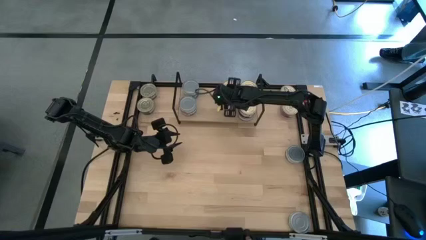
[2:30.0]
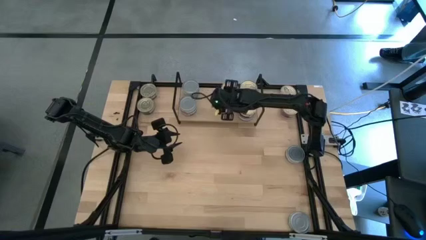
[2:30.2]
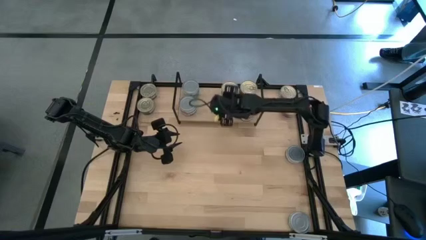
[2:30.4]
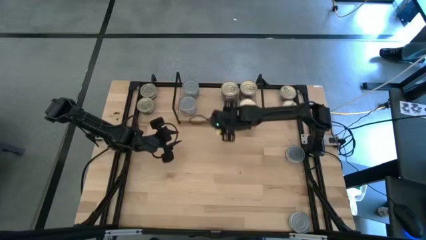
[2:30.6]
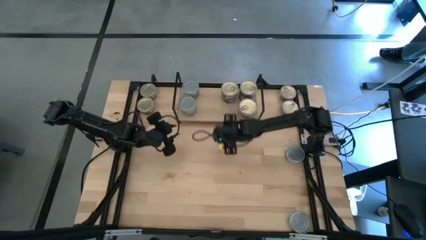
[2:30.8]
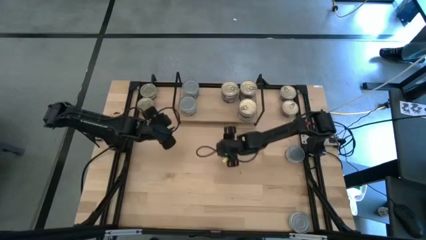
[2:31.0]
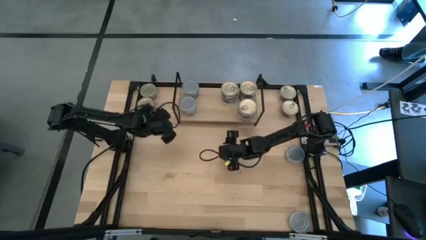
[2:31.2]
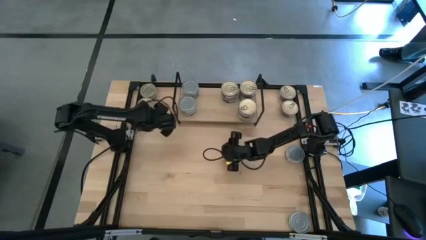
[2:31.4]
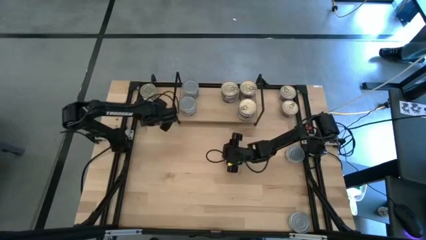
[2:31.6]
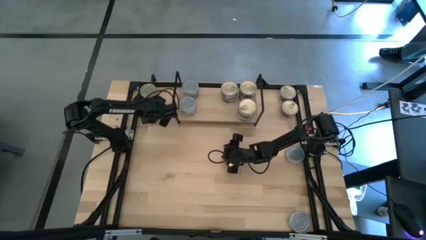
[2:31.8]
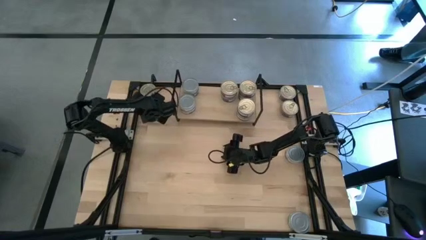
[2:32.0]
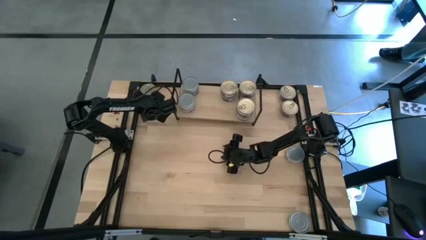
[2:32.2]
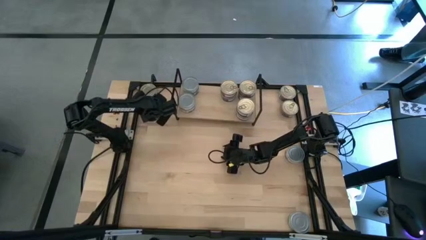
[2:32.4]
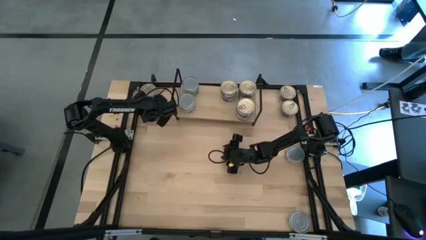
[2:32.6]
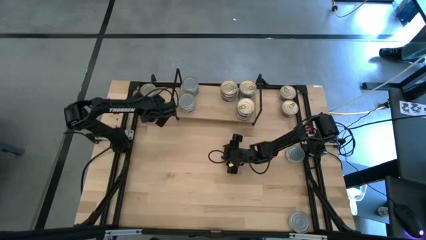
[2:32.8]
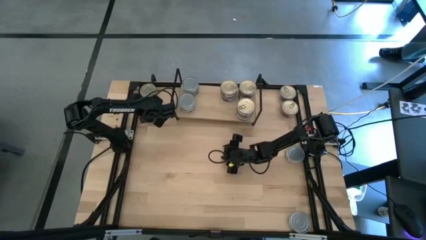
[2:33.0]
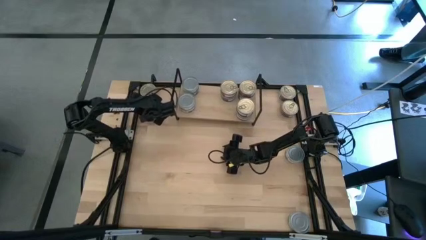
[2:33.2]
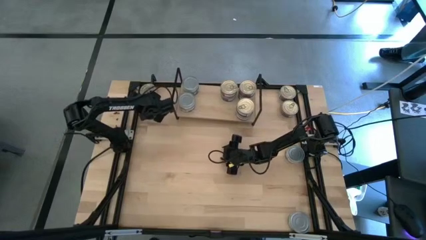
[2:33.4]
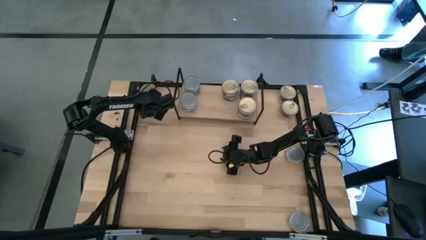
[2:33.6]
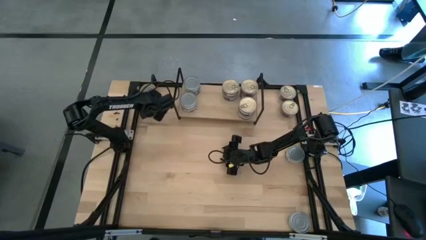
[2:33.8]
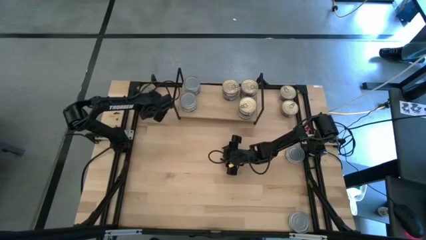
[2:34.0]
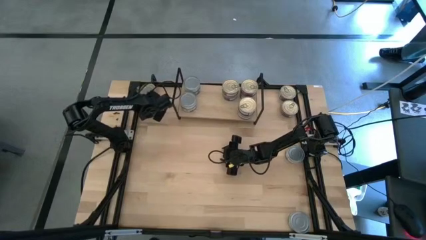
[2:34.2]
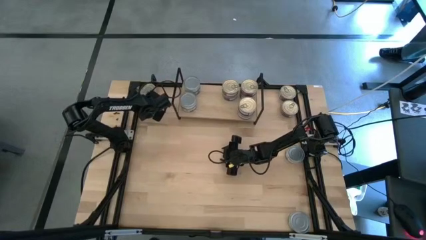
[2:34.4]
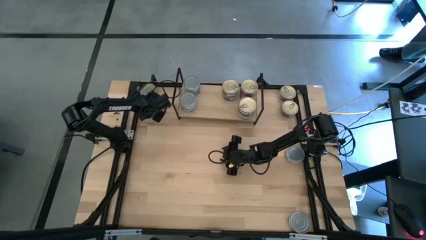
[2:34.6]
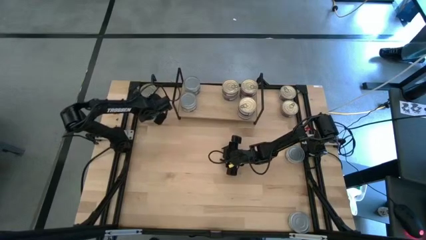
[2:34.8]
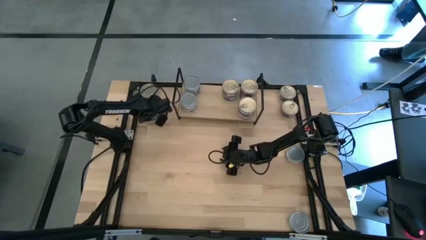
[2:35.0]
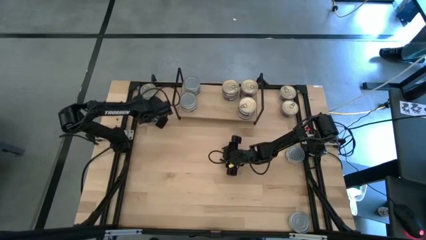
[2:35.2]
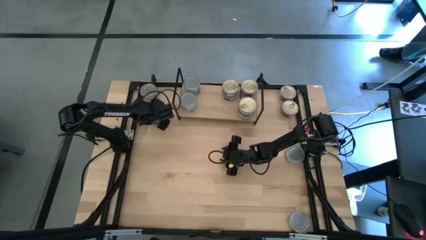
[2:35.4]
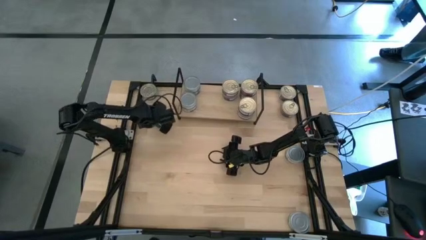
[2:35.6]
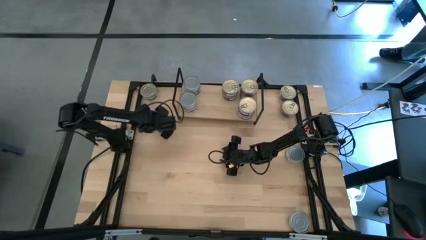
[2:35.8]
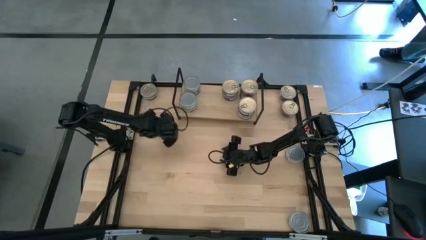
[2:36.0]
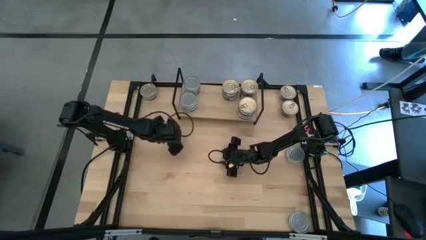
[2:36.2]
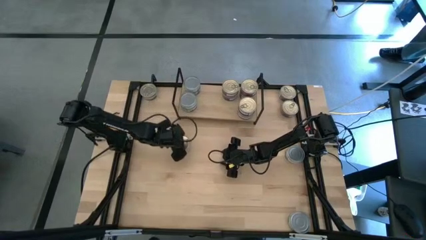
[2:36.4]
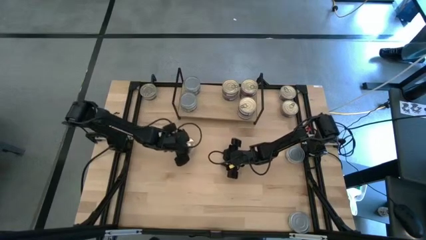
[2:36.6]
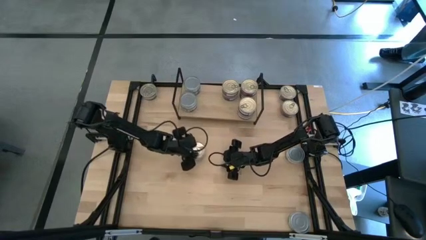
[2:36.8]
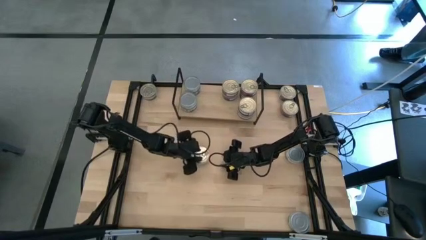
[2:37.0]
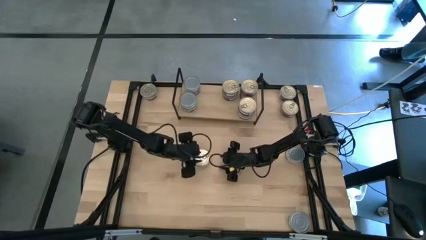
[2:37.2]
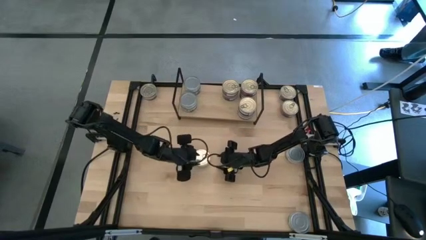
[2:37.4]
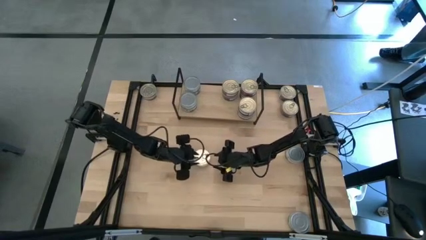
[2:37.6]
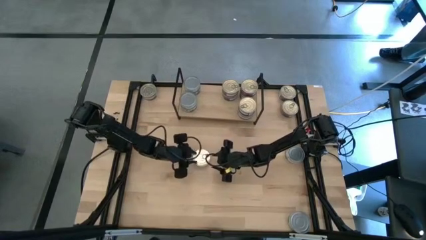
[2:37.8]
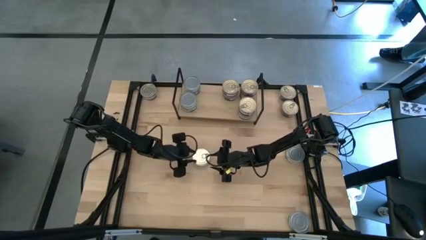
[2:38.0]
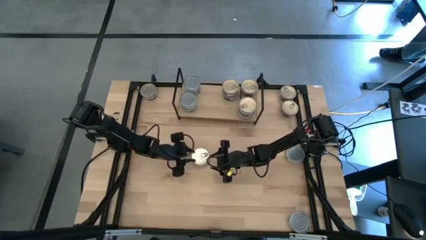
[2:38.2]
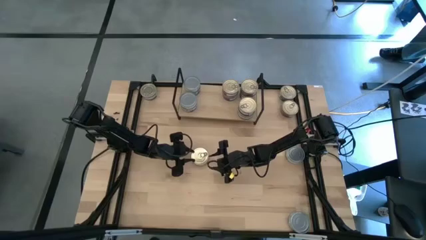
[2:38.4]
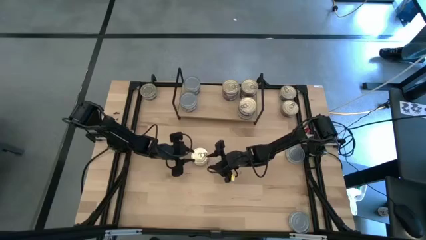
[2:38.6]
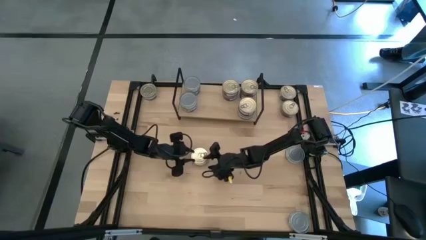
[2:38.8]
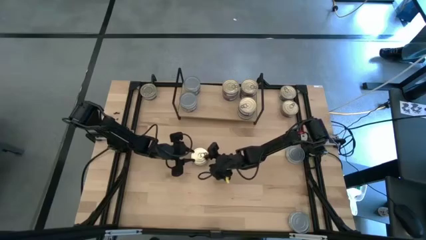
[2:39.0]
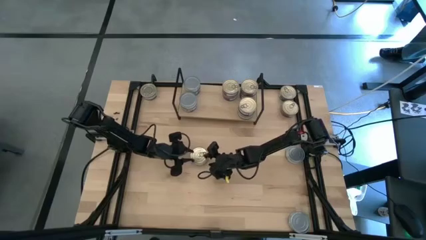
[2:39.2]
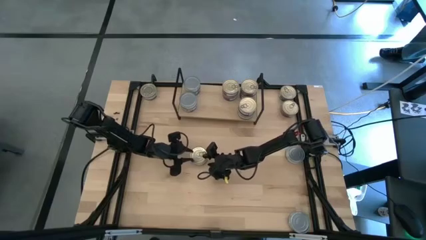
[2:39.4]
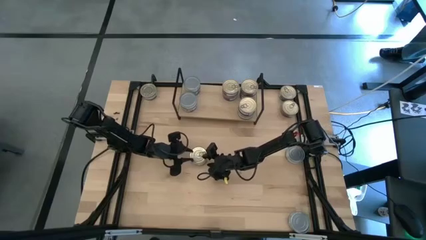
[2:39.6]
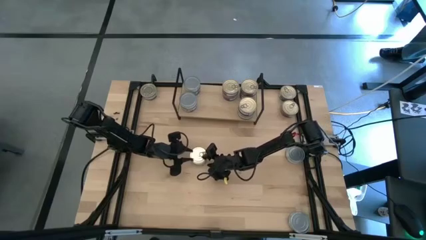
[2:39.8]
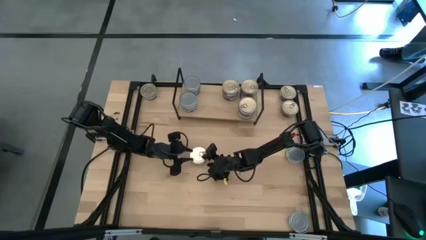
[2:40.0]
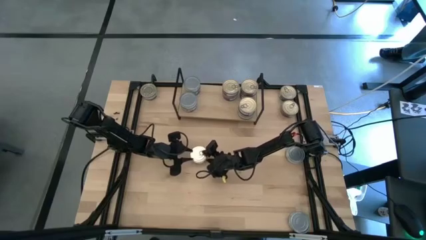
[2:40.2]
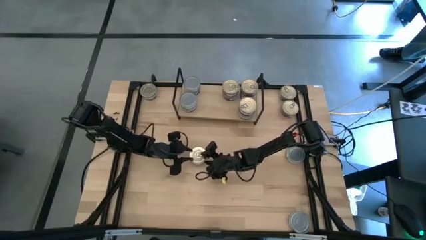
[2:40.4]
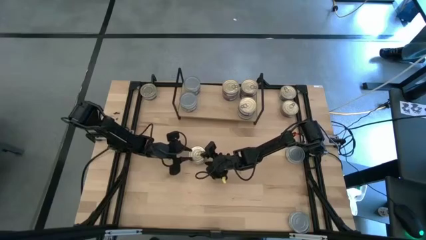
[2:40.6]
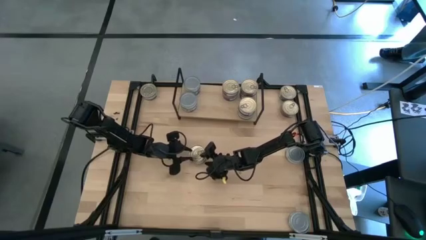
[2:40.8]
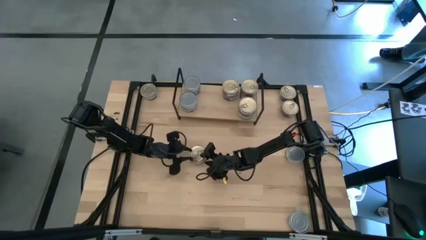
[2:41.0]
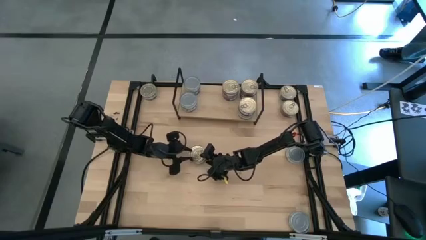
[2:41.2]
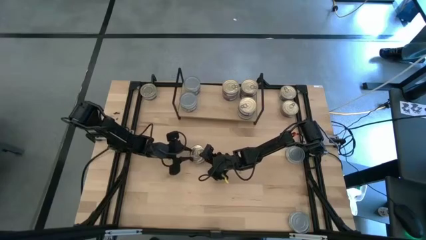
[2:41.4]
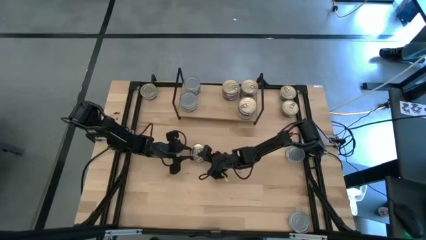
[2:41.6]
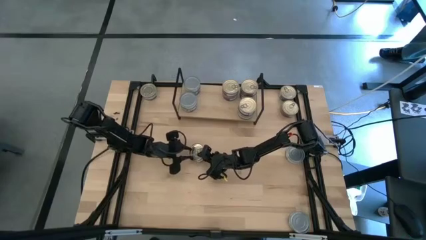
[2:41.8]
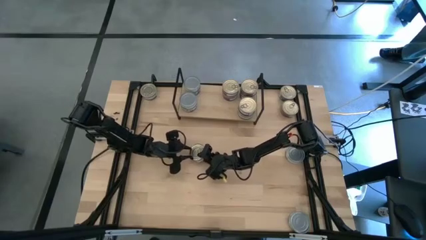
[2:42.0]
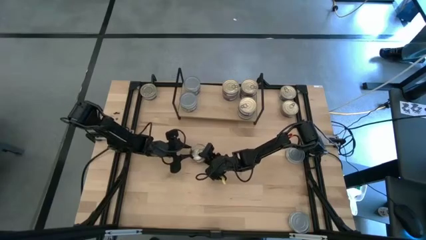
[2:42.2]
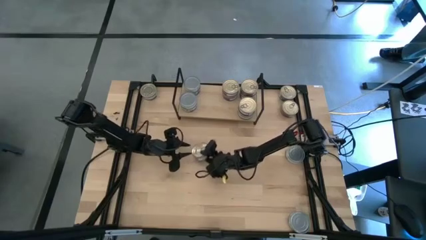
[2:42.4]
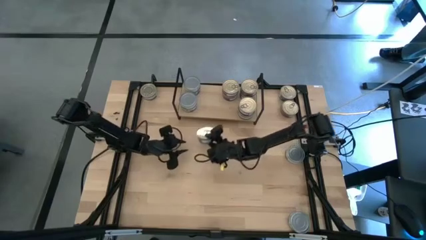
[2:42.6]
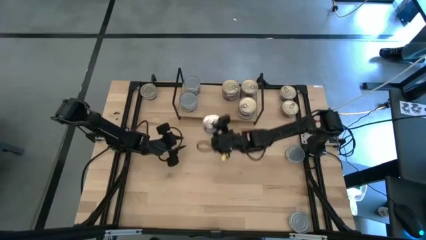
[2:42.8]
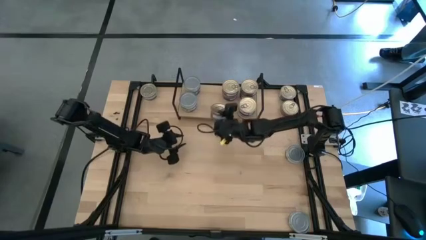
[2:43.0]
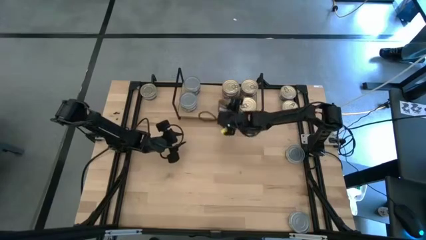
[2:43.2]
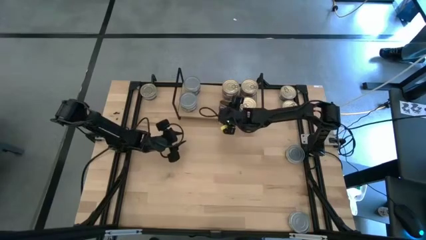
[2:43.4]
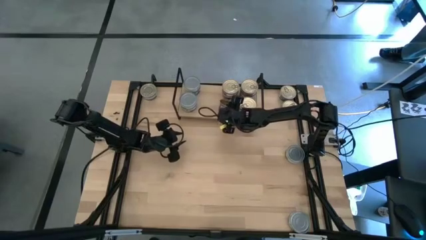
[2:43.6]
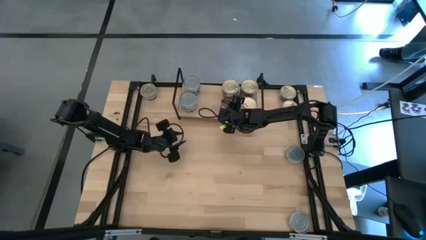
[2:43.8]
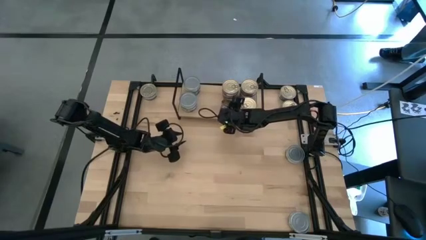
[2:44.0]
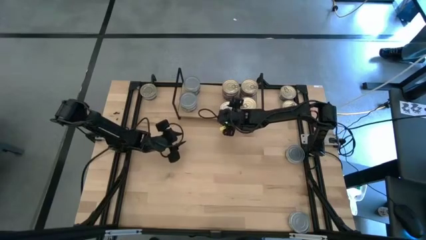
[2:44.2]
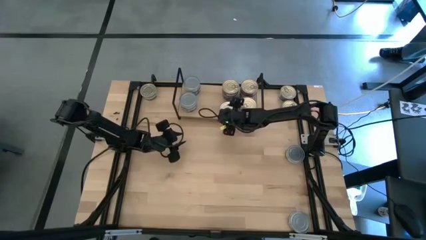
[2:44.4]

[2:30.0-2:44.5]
Task: Stack canned seafood by type on shelf
Put the blue pink tuna can on the shelf aligned with the stacked blue pink tuna cans

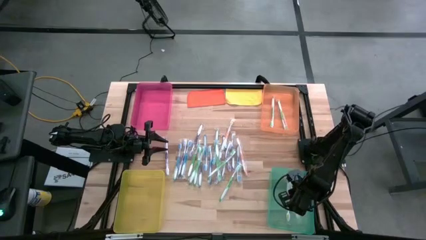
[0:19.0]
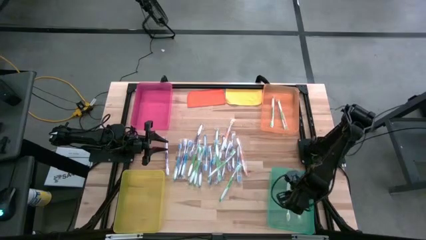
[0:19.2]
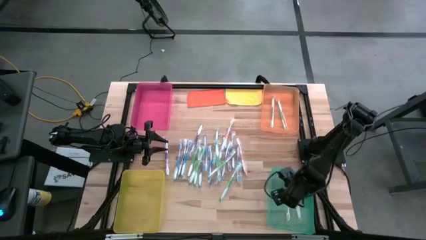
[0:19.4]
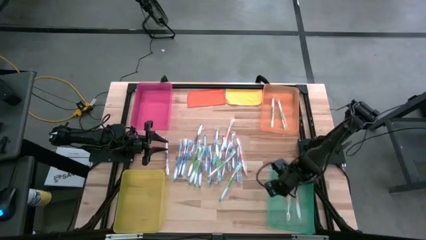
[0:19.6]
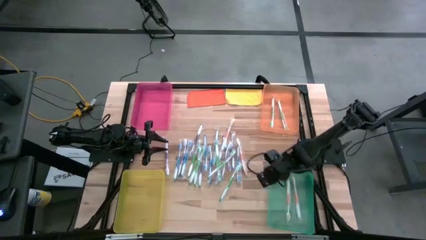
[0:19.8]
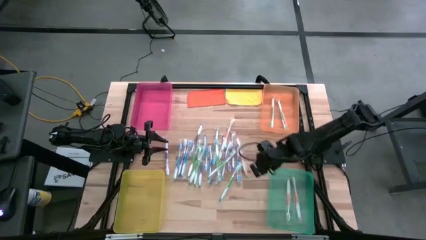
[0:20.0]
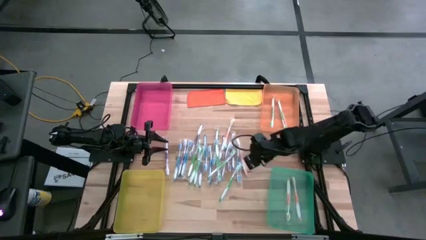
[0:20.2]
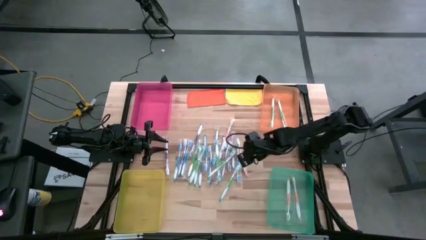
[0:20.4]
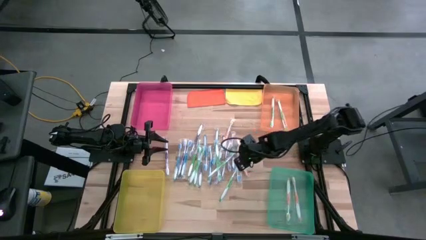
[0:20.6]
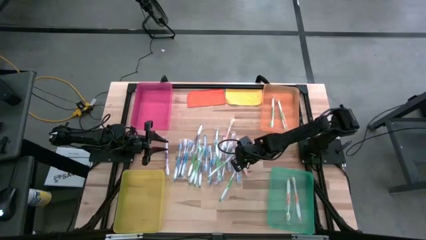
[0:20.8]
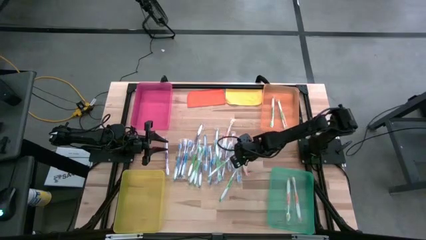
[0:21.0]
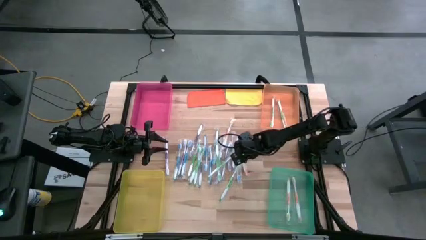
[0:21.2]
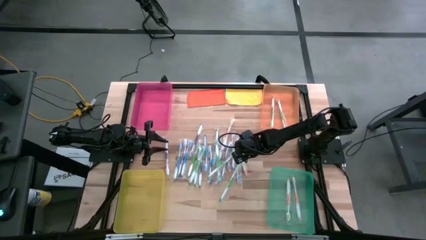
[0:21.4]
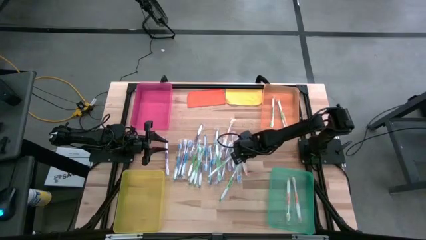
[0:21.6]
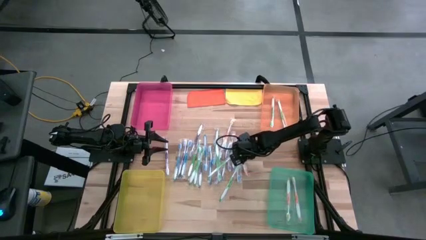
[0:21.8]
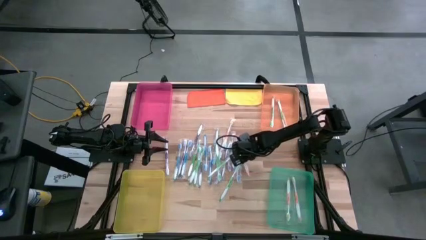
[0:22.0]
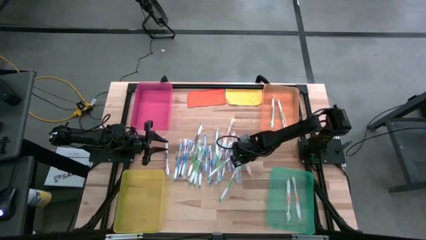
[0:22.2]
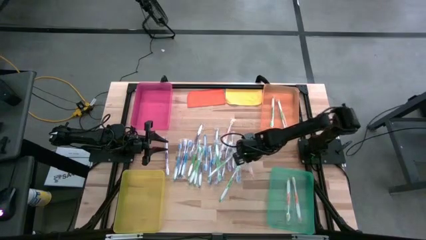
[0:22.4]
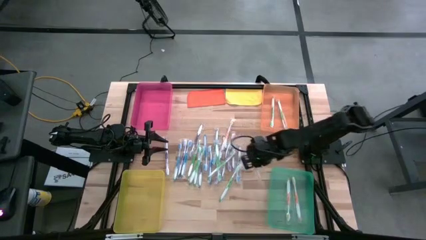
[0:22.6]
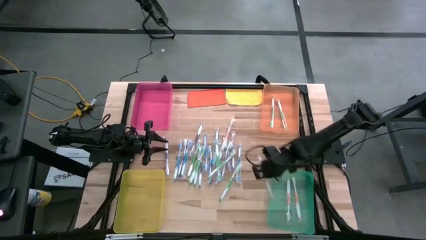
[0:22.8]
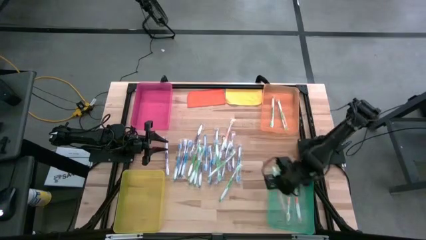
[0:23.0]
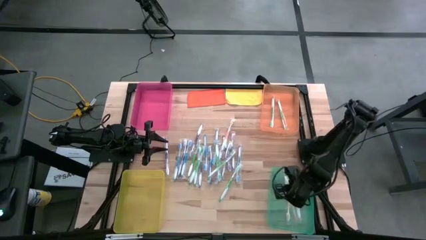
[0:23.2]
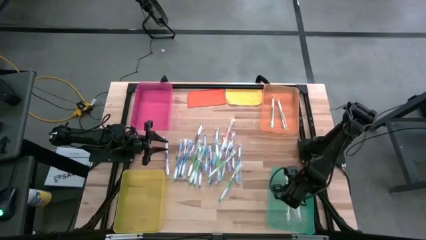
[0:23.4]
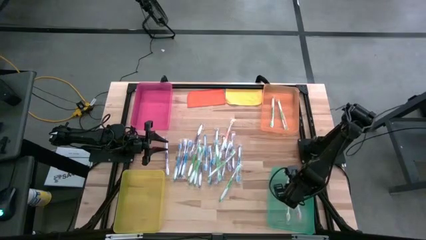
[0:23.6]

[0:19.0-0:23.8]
Task: Pick & Place Toothbrushes
Put the orange toothbrush into the green bin
